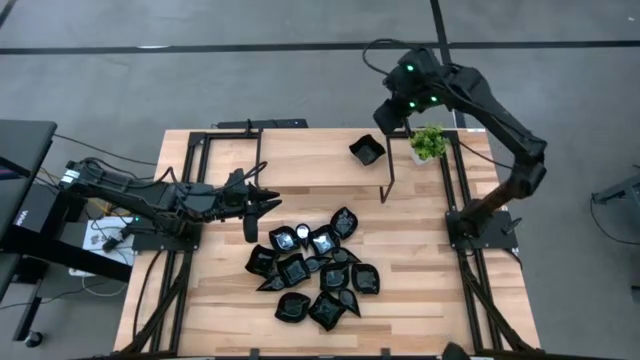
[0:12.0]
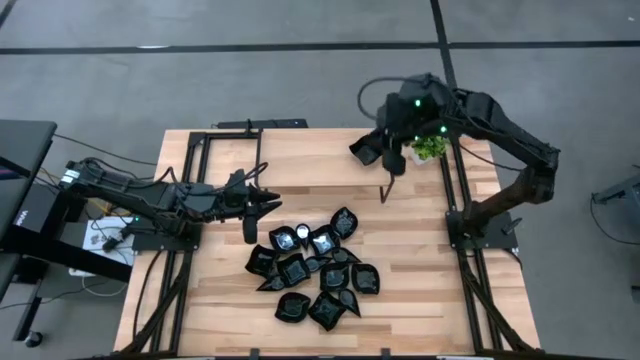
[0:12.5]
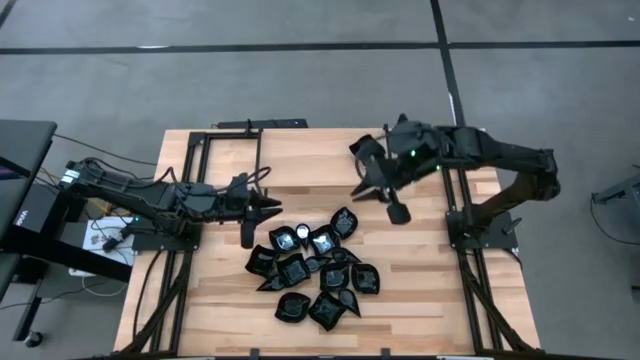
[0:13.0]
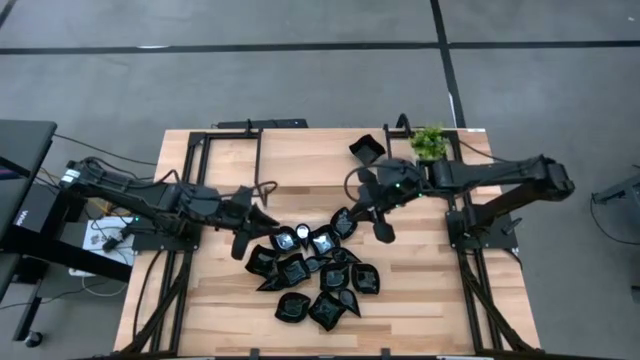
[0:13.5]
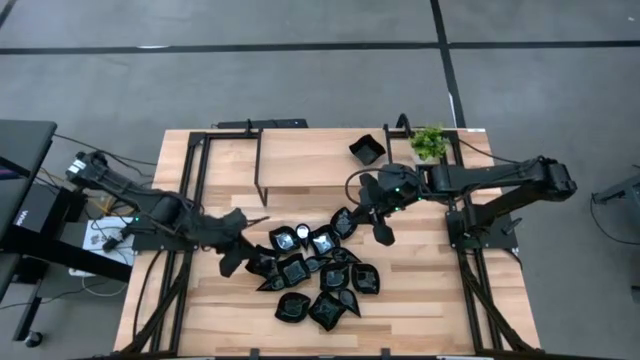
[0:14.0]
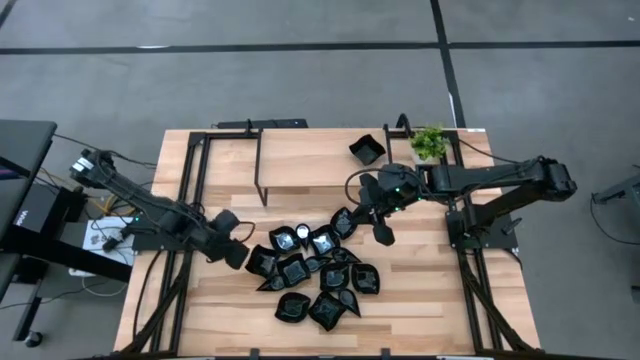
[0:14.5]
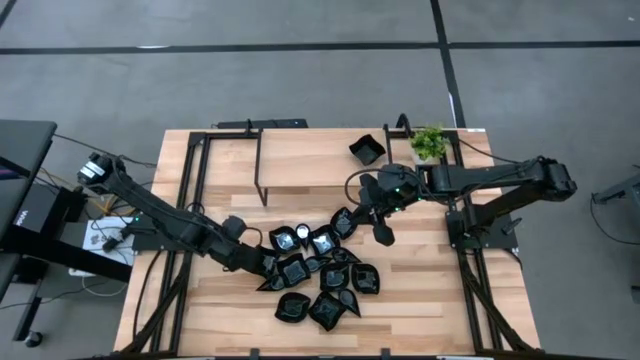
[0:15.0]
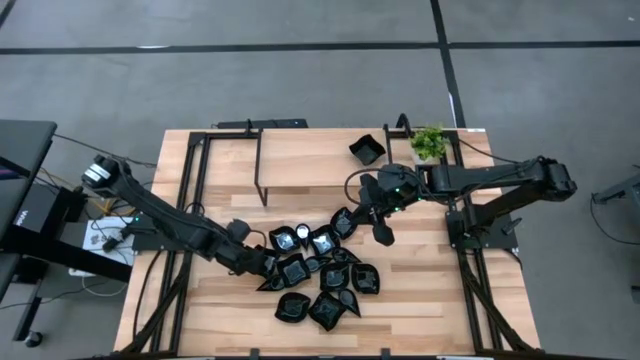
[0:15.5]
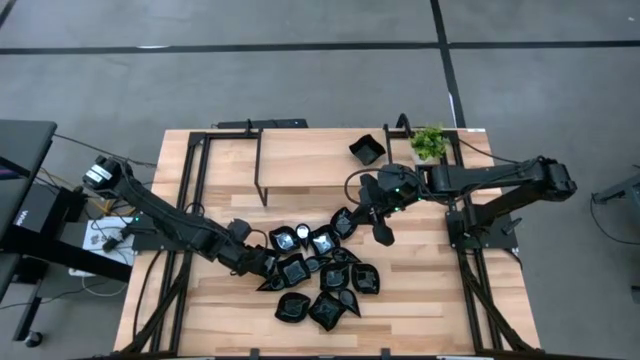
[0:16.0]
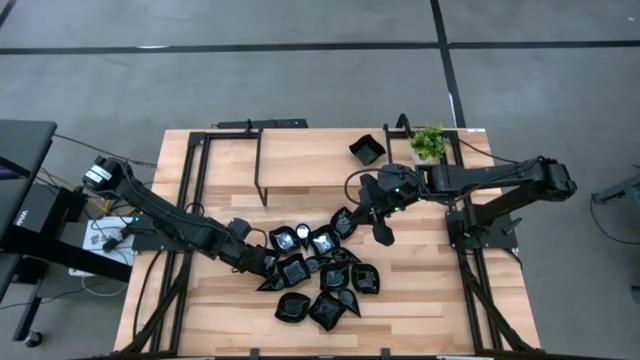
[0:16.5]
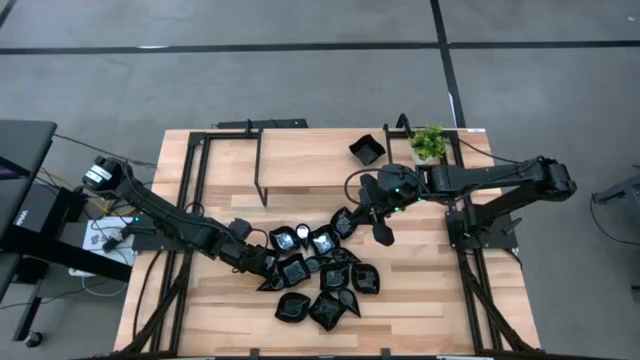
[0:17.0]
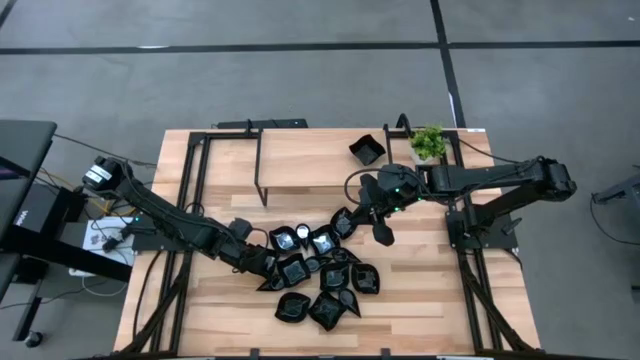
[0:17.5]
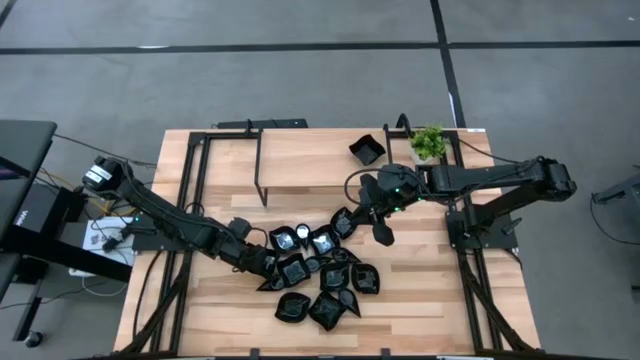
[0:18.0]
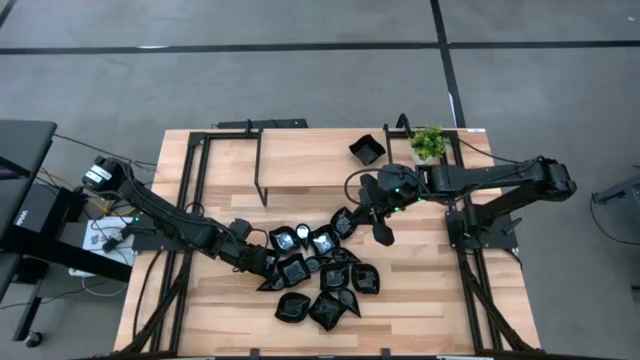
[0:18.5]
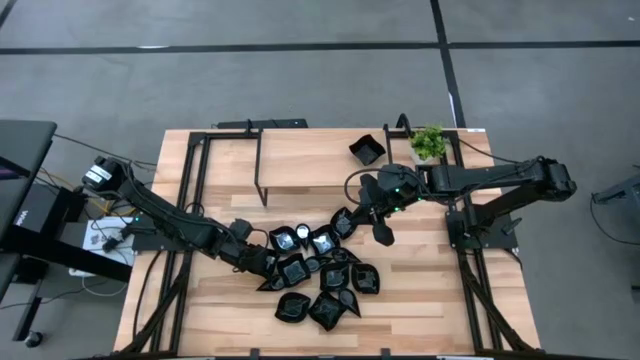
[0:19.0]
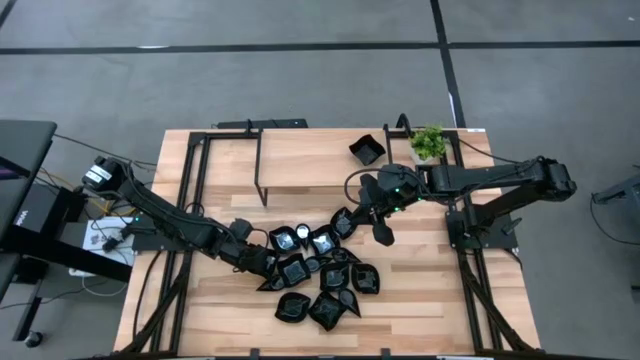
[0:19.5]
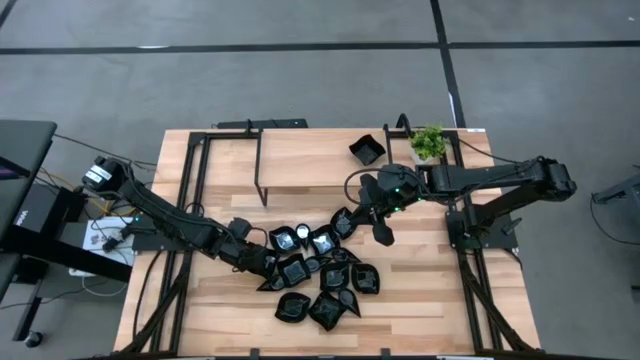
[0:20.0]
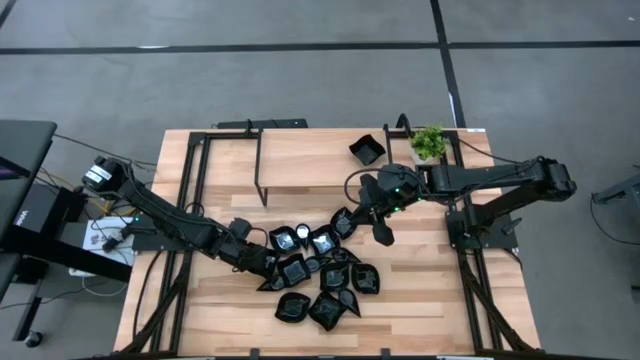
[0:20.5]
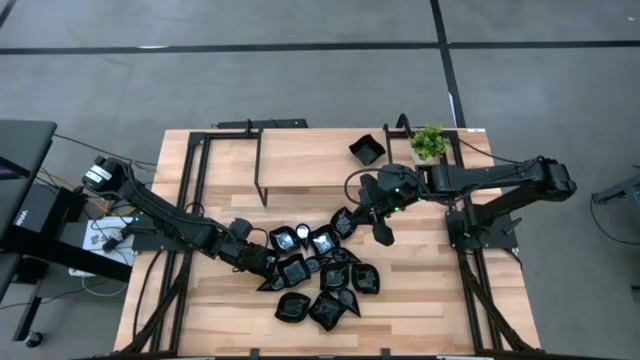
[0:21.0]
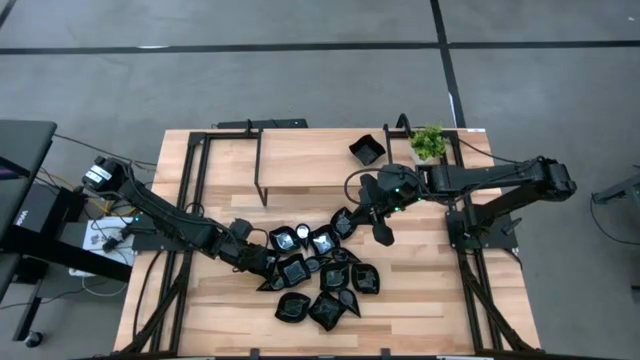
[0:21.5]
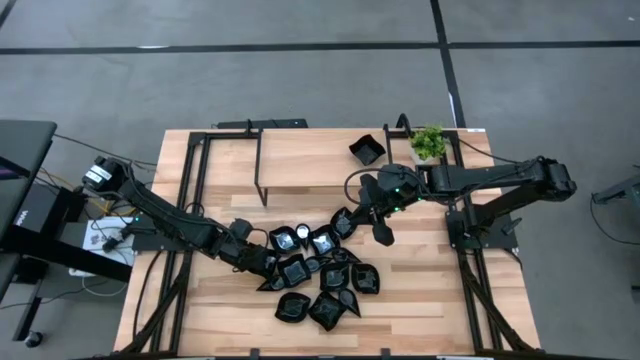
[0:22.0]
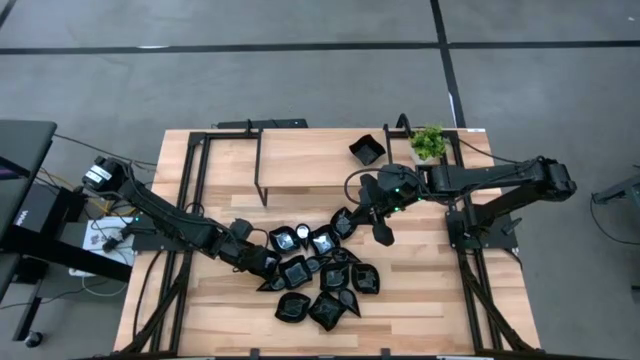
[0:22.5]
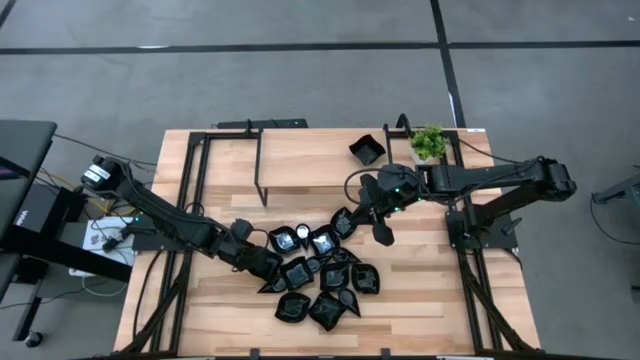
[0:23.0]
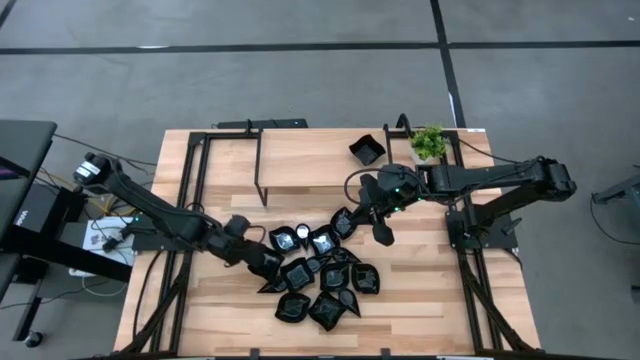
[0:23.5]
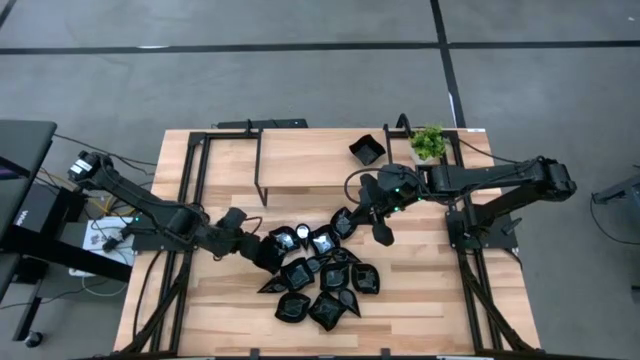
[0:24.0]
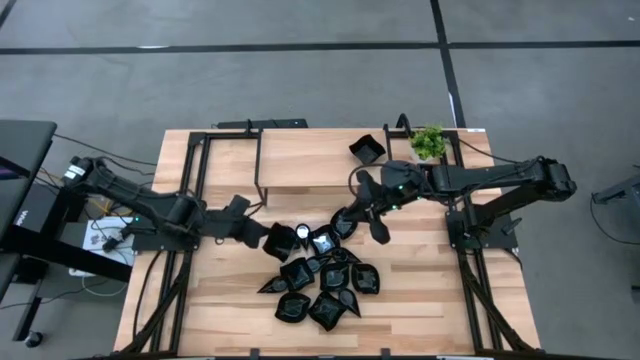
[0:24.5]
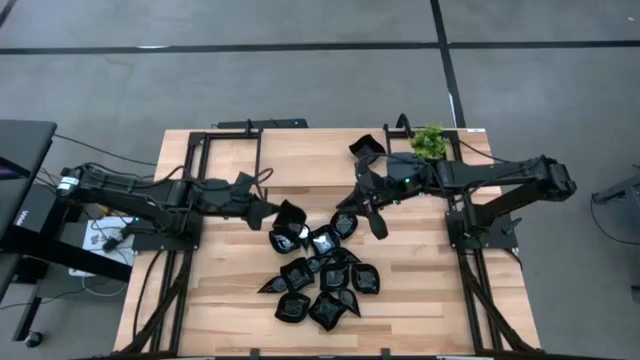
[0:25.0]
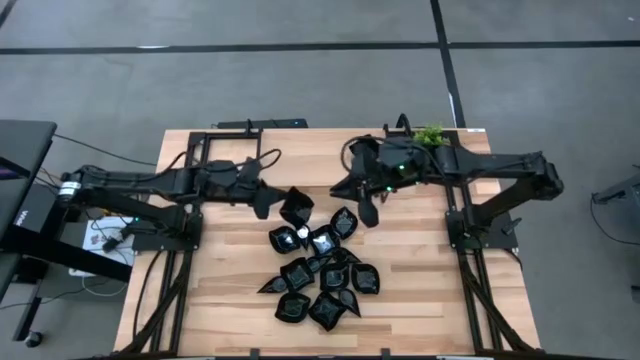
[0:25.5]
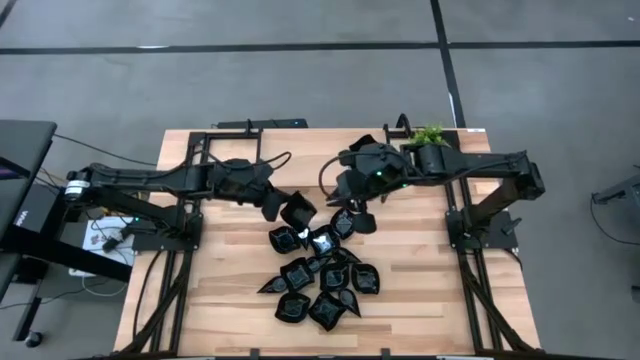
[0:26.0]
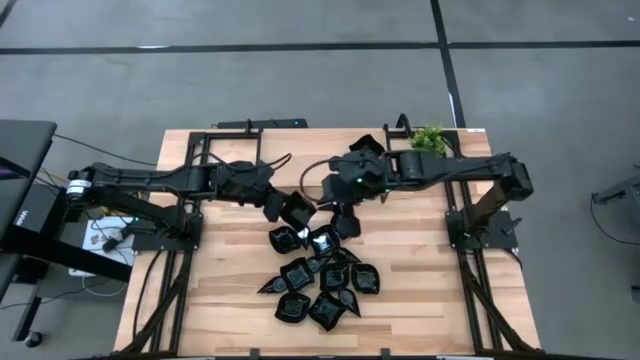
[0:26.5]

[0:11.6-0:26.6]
Task: Pick & Place Mini shaped plates
Stack the black distorted square plate on the black distorted square plate on the shelf

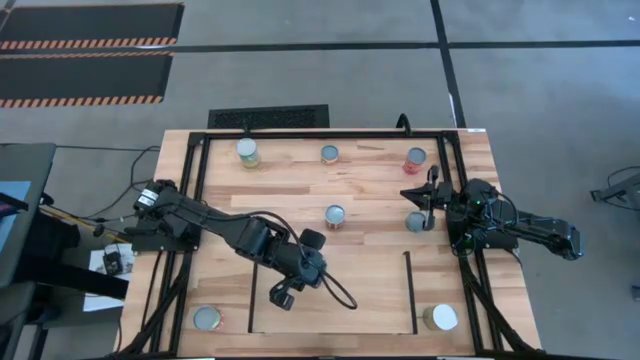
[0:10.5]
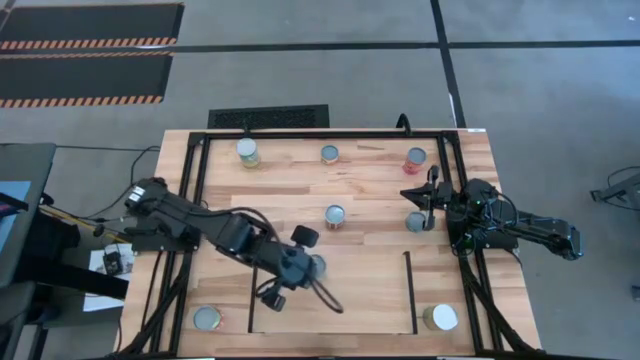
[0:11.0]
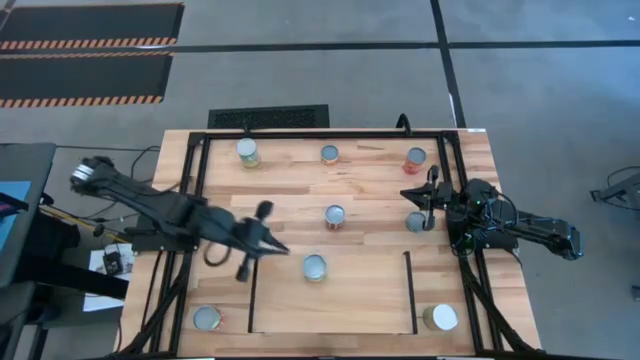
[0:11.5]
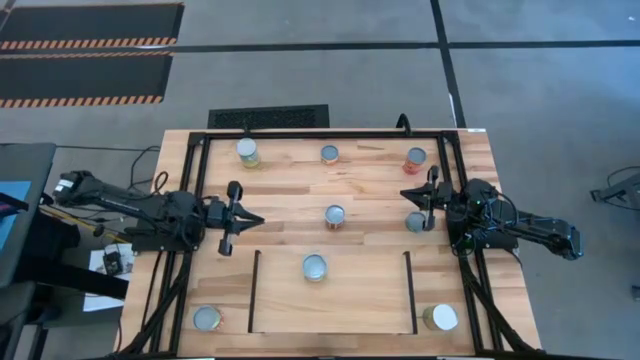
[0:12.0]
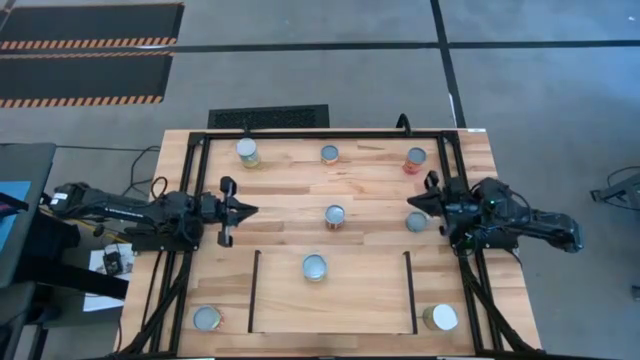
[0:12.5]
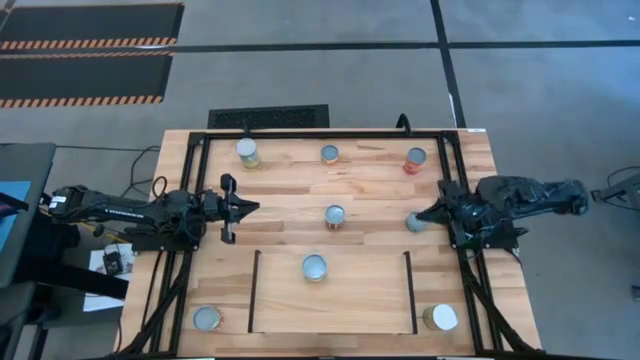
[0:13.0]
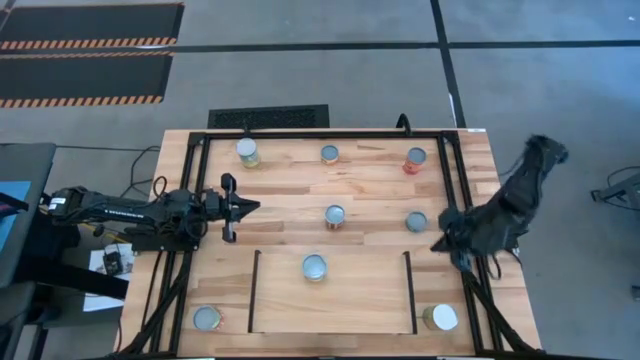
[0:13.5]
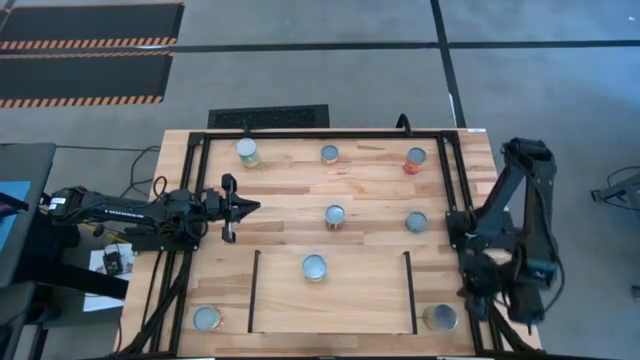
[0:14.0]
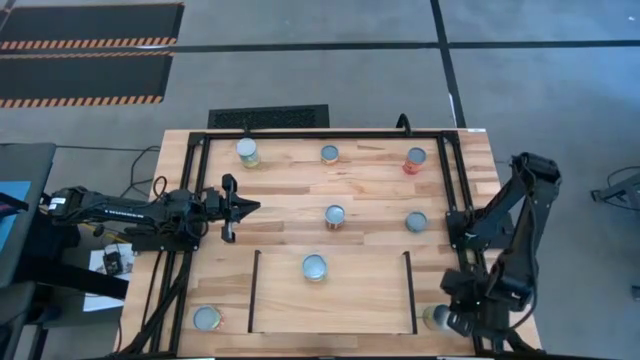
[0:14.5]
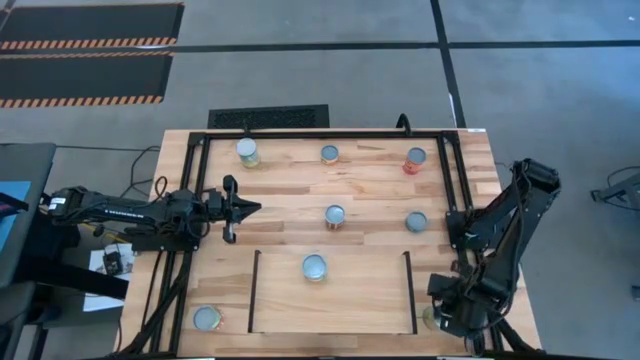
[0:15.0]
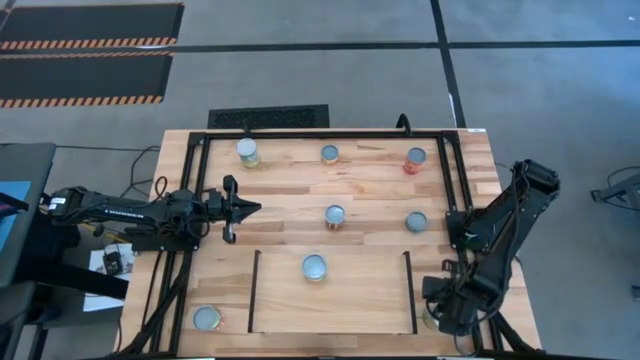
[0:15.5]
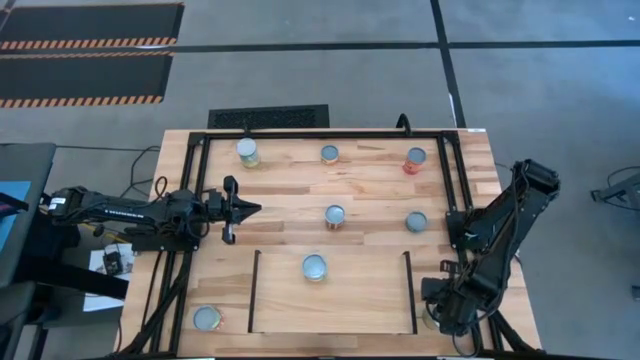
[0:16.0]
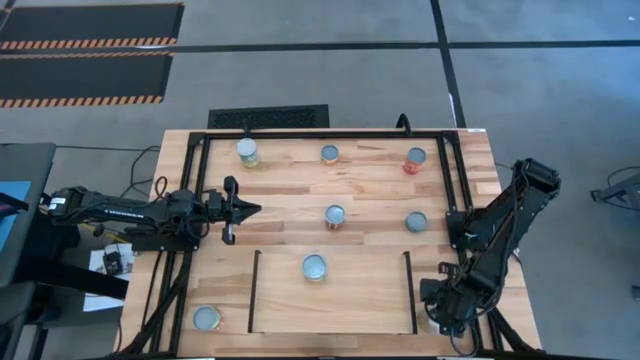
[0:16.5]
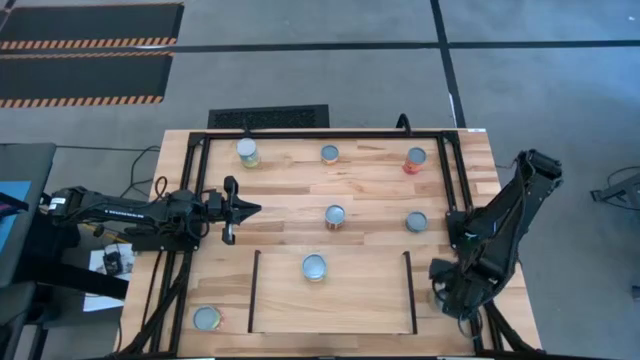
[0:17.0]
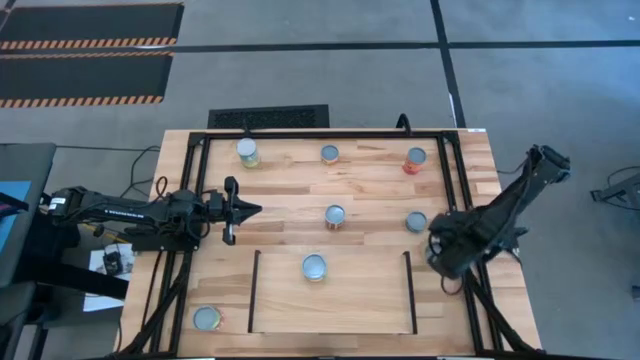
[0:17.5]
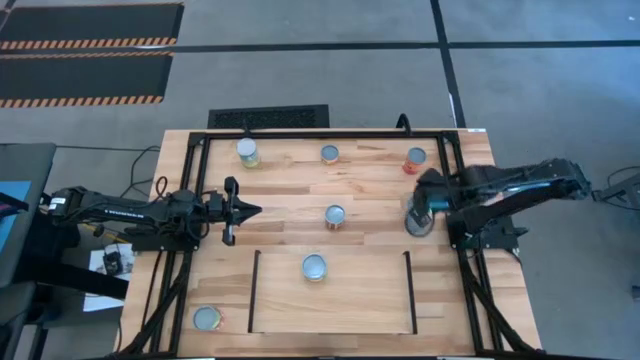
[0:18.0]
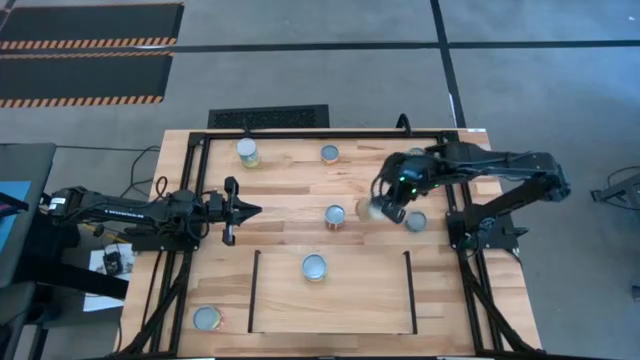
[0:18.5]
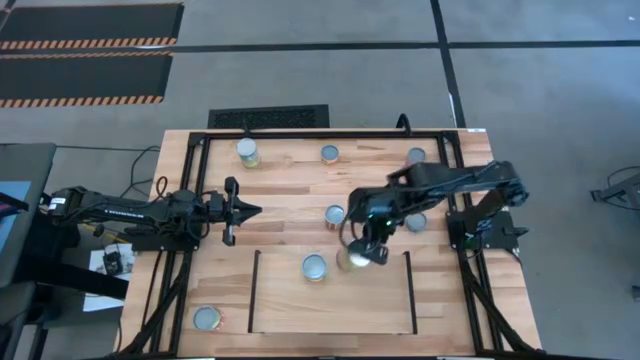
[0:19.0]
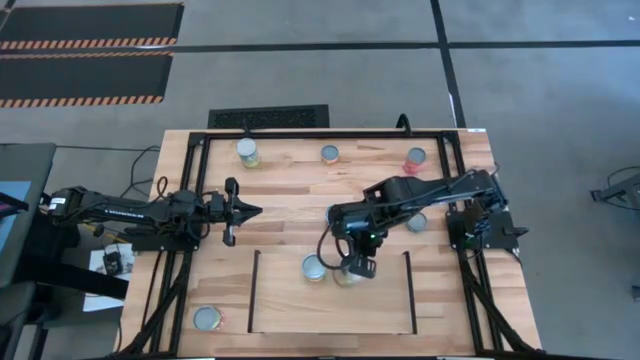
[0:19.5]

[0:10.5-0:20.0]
Task: Pick and place cans onto a shelf
Put the green orange can on the shelf
